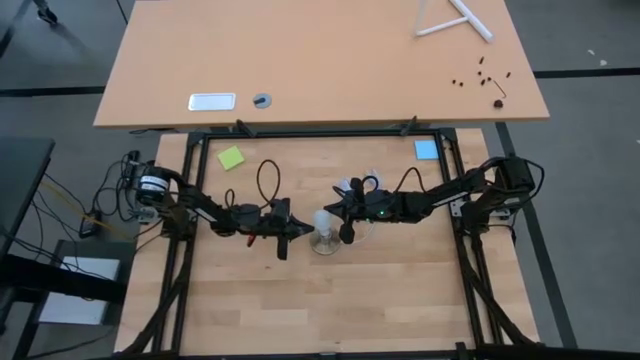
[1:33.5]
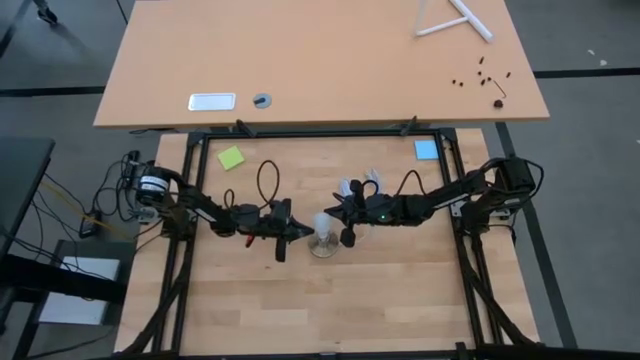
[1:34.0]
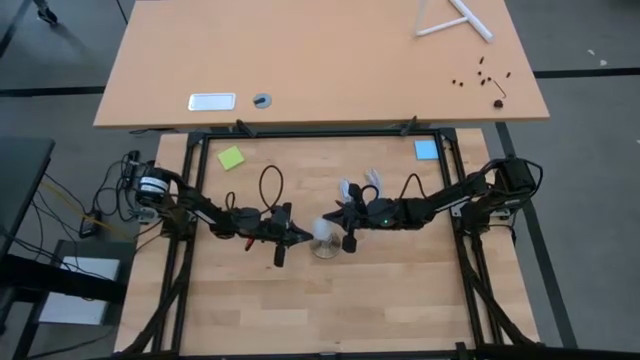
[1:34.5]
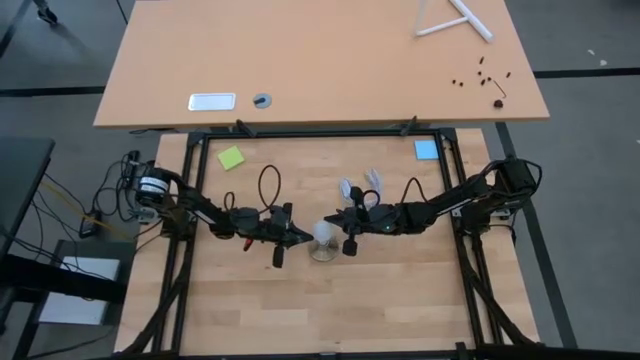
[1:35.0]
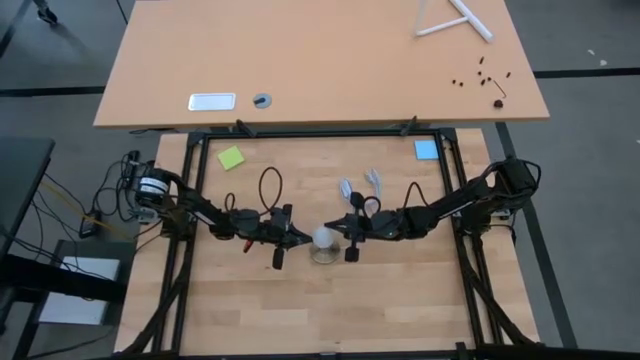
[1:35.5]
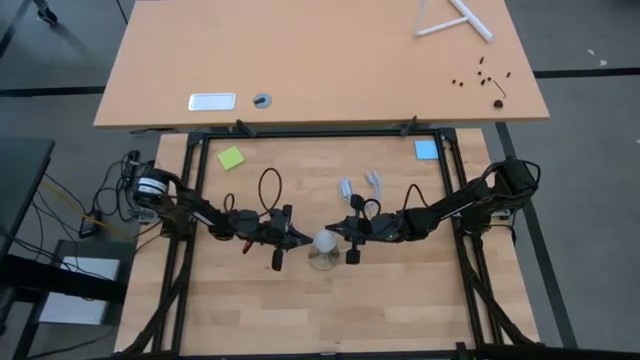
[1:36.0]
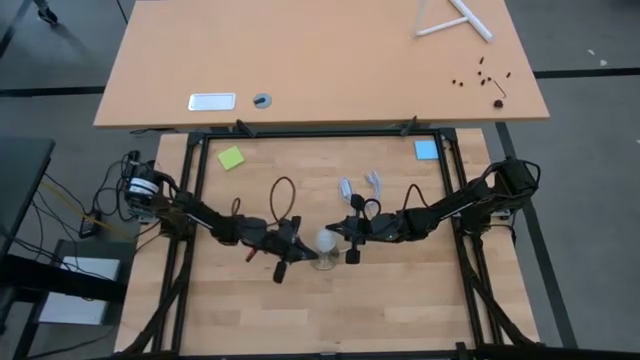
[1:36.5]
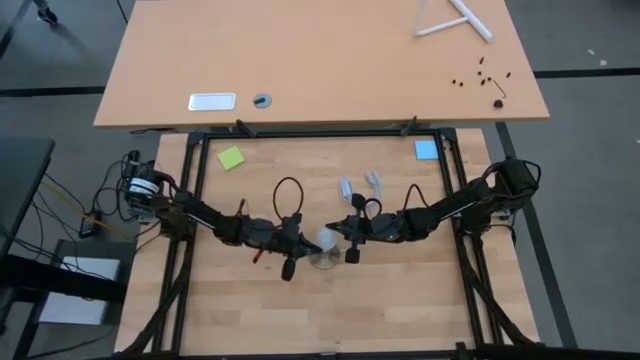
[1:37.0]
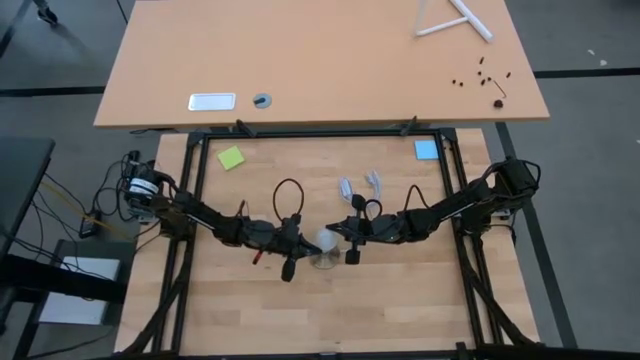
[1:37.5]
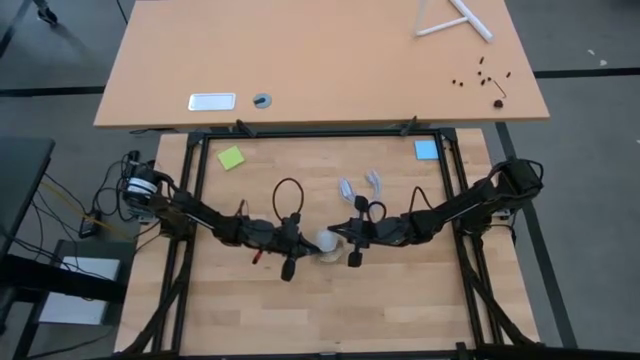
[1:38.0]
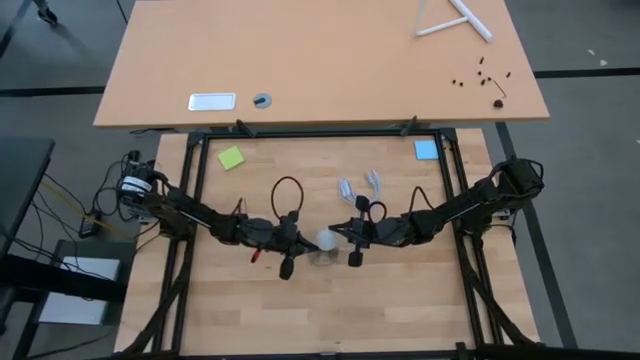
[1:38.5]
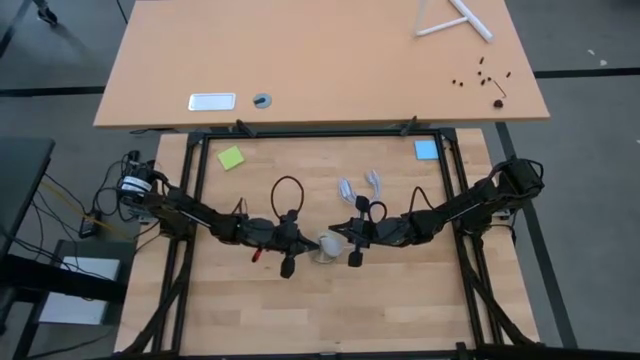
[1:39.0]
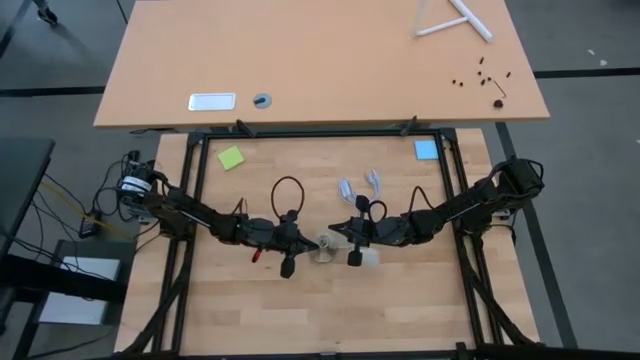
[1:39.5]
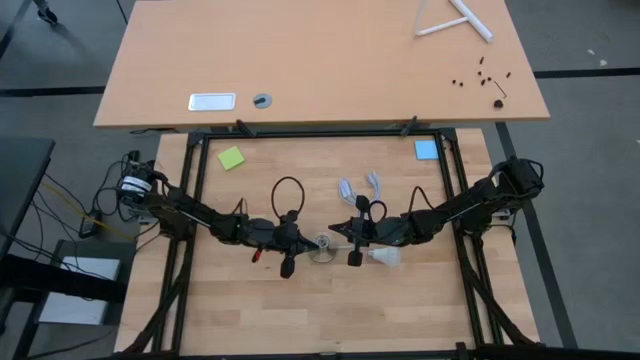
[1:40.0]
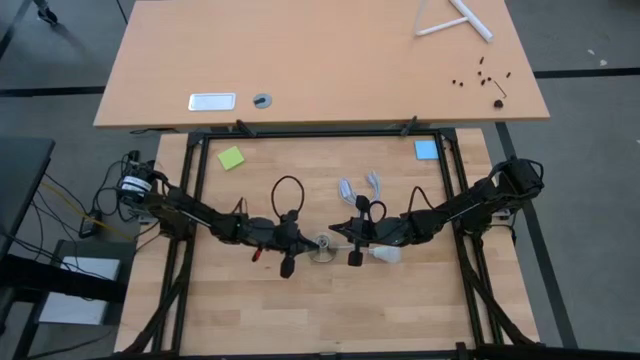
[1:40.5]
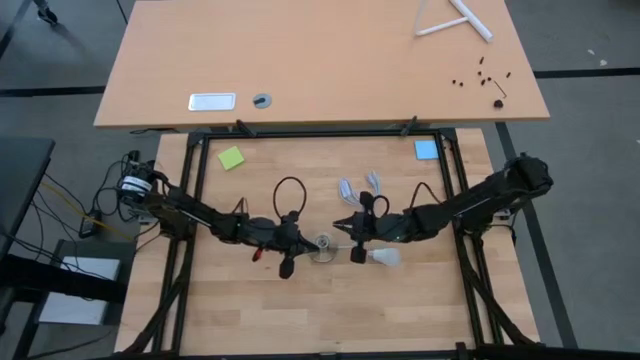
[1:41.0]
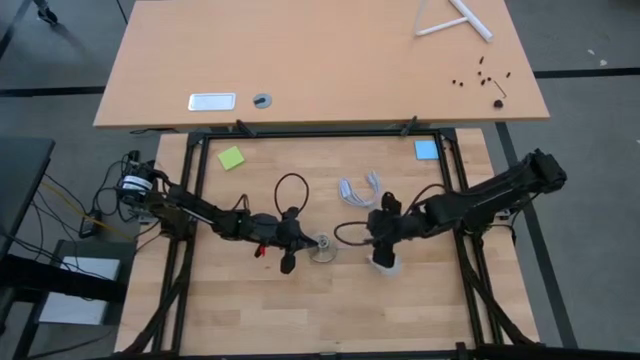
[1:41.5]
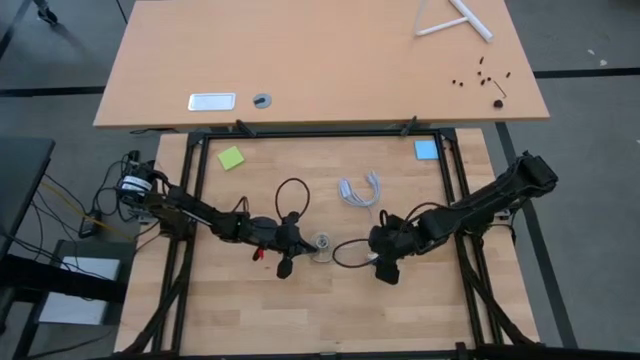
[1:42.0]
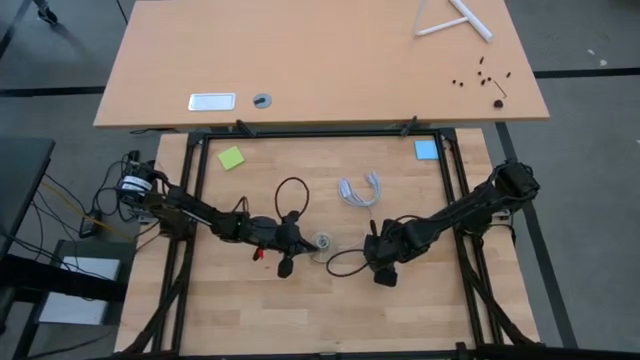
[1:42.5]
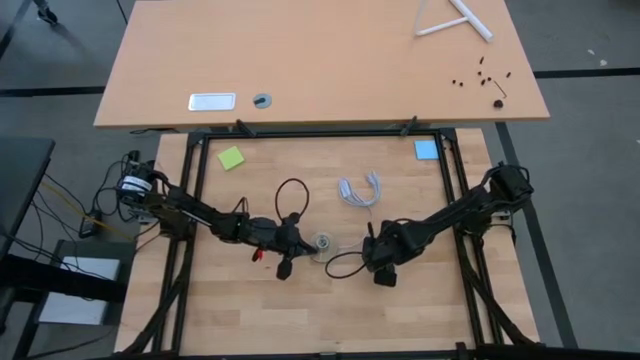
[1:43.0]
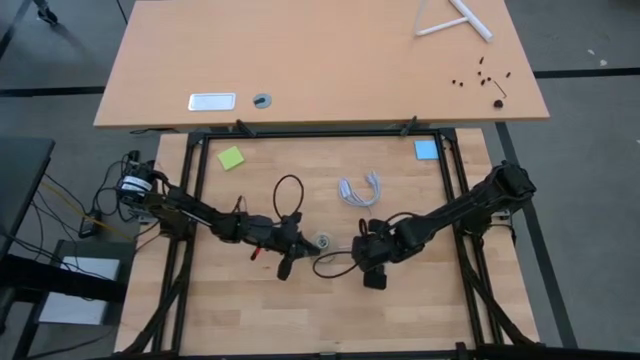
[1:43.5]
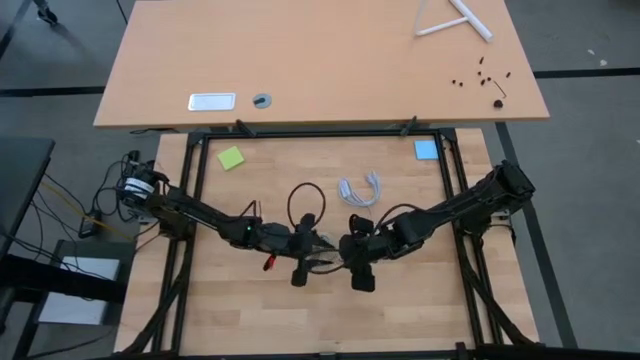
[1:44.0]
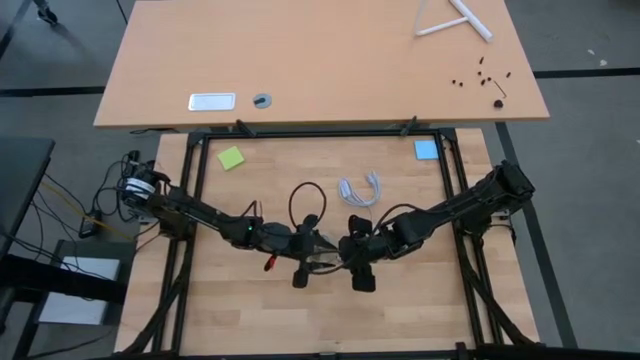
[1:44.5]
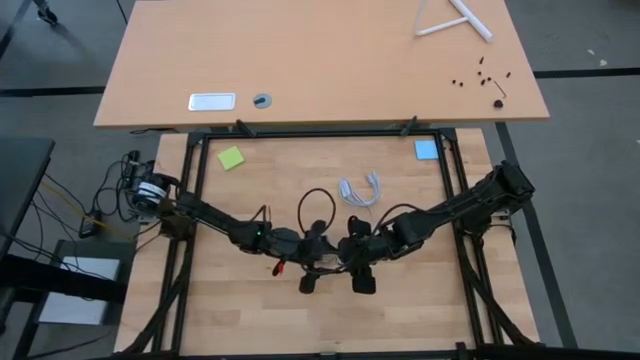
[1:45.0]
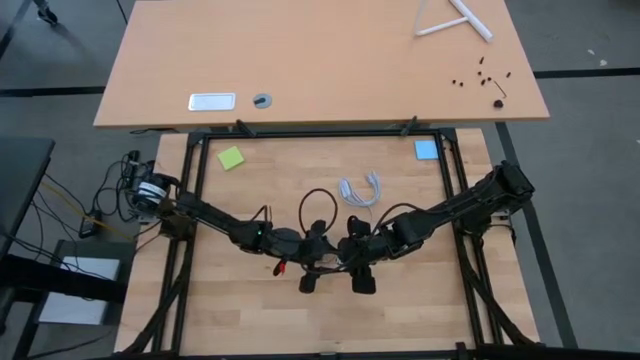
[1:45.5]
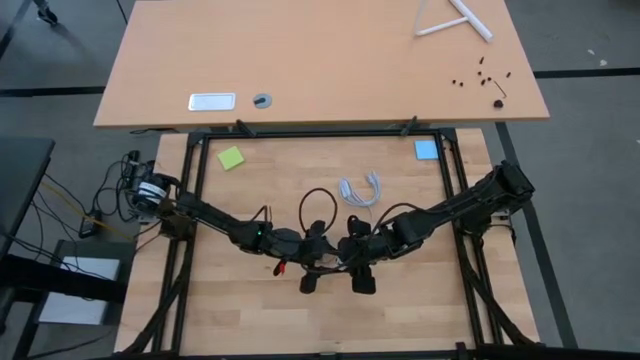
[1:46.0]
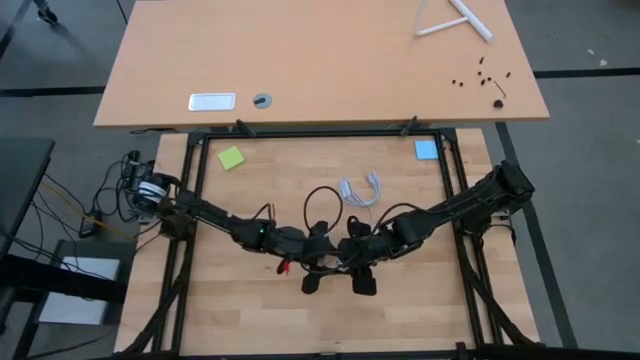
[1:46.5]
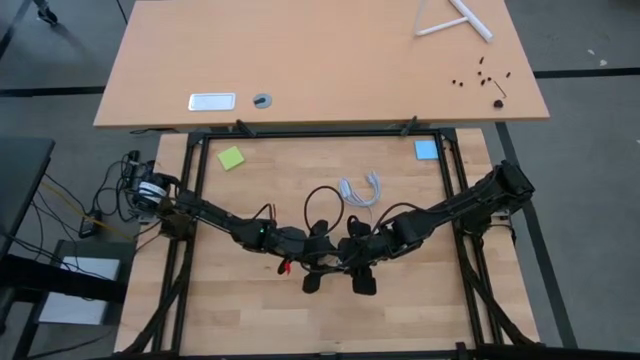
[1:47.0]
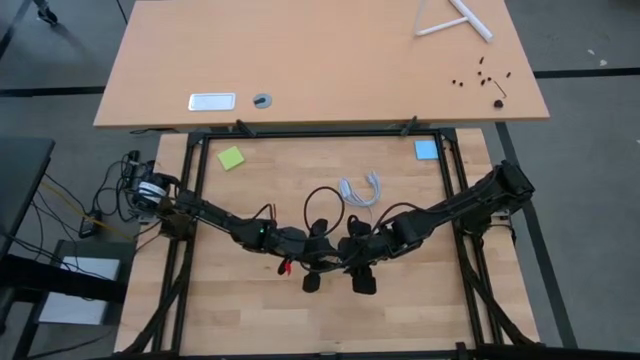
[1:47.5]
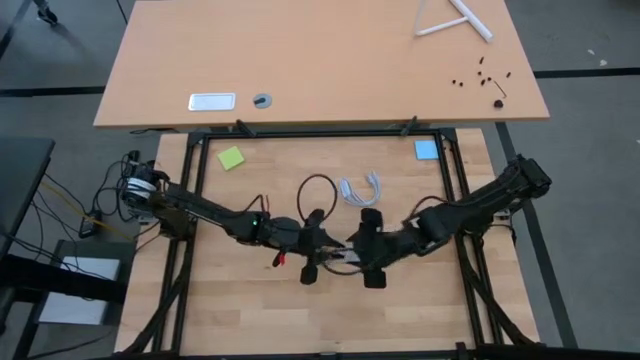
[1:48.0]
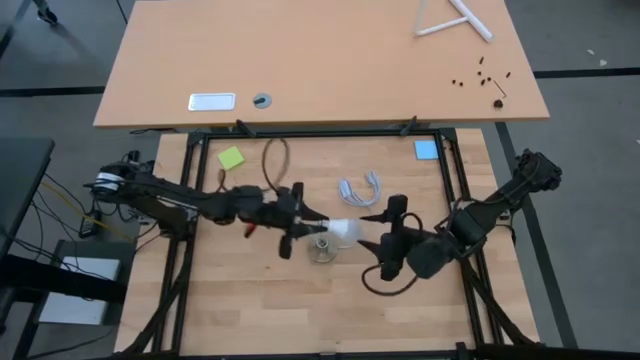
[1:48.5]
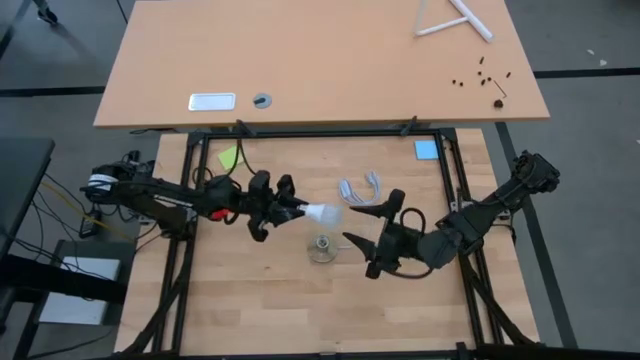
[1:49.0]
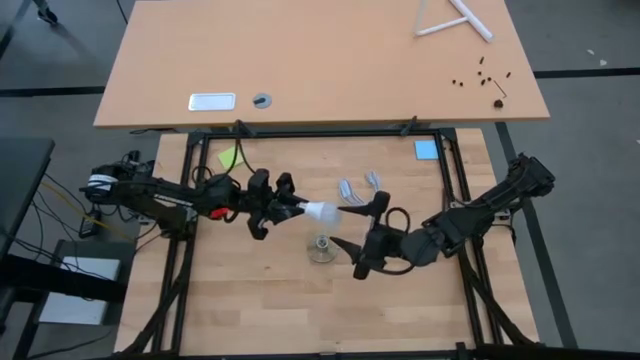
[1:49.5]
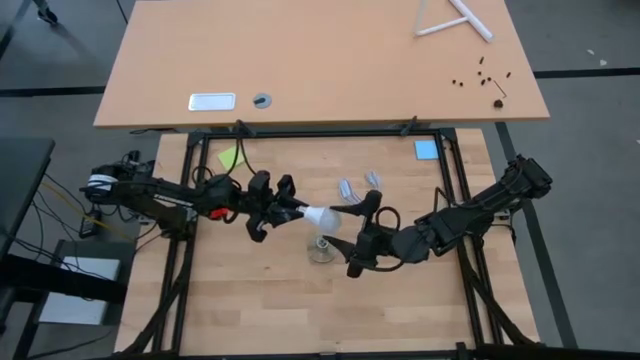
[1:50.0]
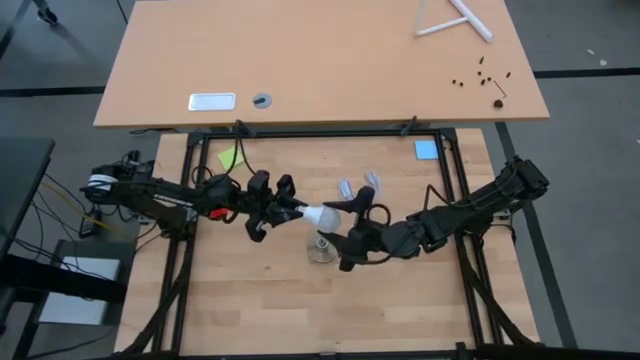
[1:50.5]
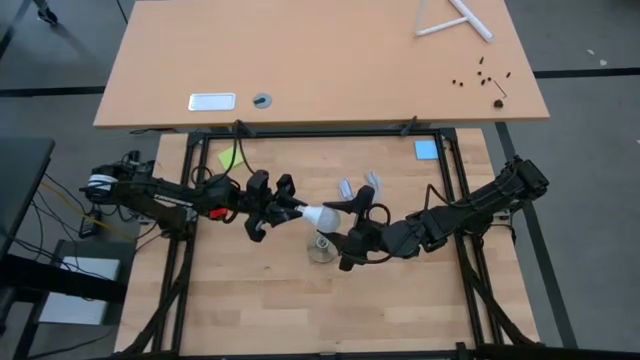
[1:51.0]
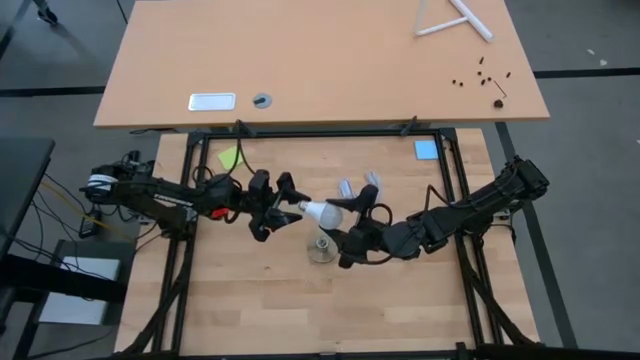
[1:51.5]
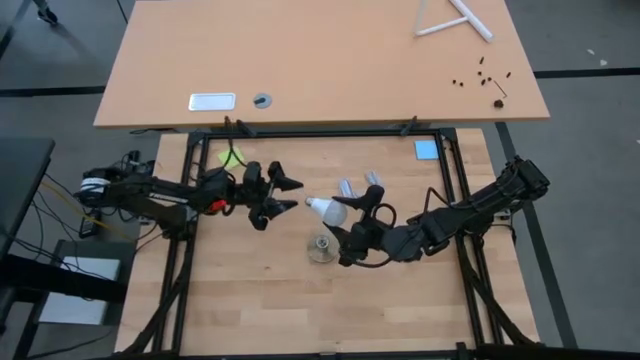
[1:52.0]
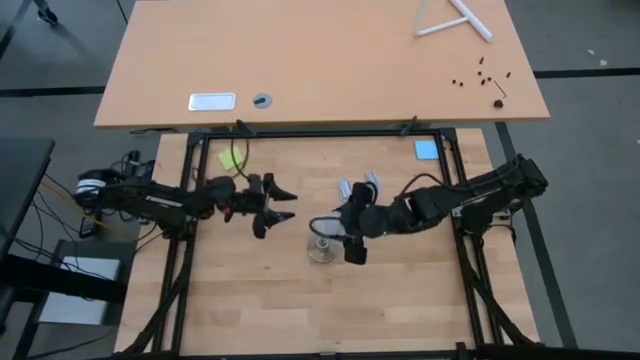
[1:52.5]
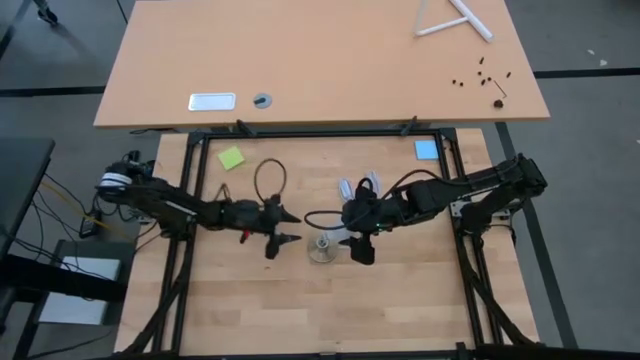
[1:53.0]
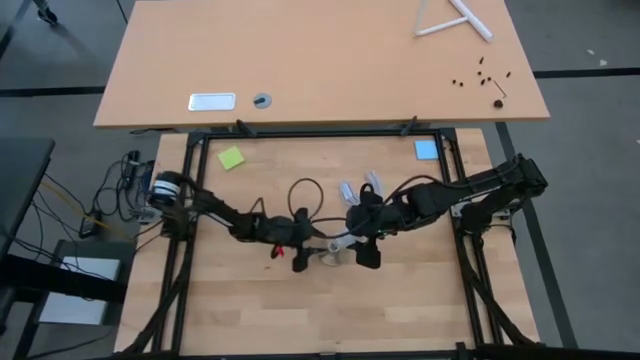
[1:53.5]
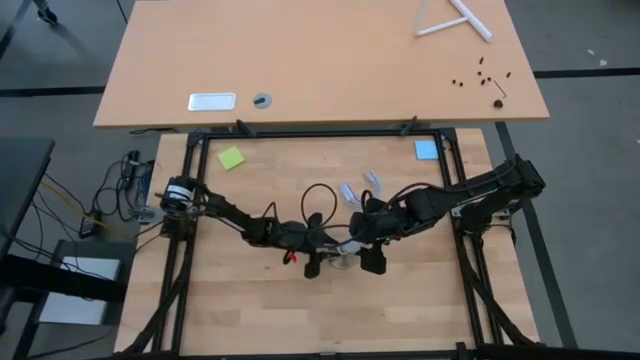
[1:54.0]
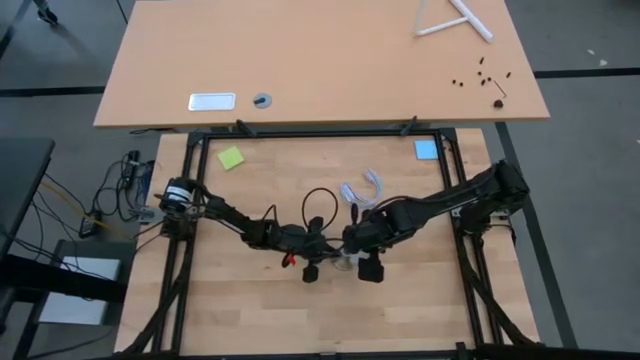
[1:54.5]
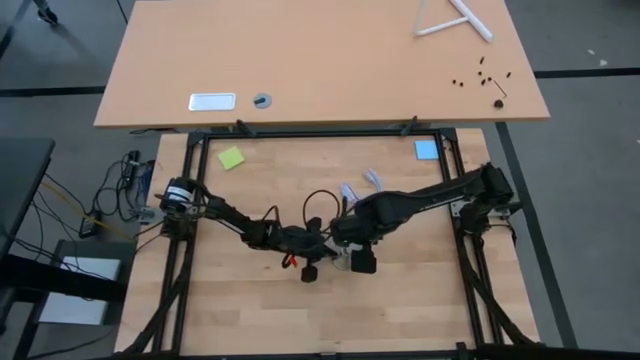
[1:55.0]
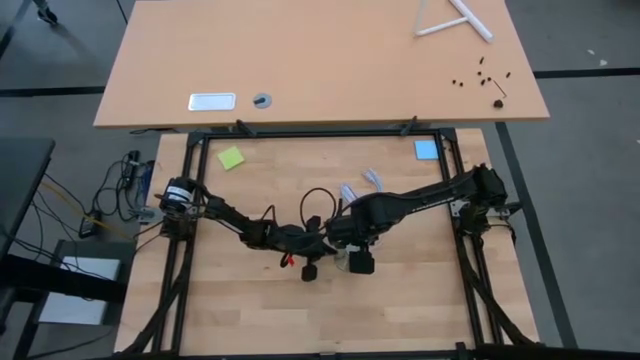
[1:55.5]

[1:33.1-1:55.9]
Task: Screw lightbulb
Insert the lightbulb into the lamp
